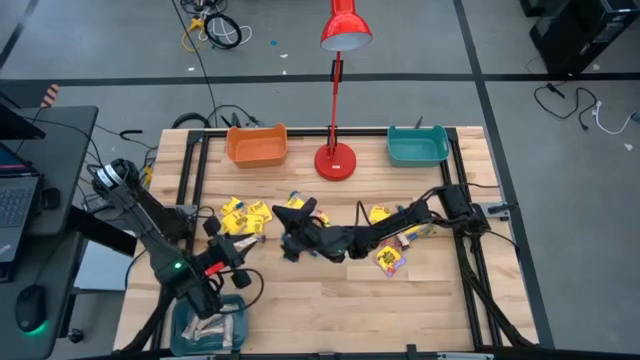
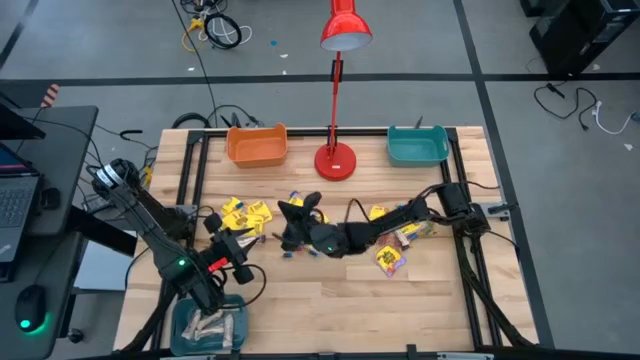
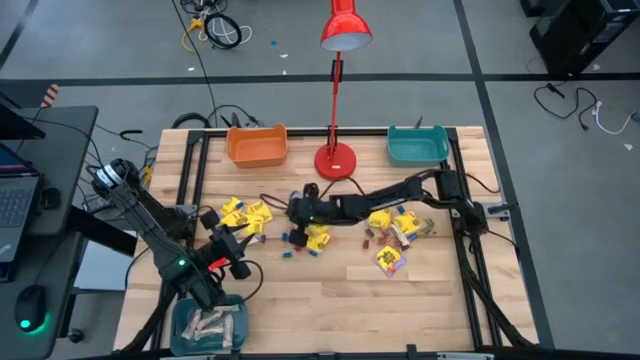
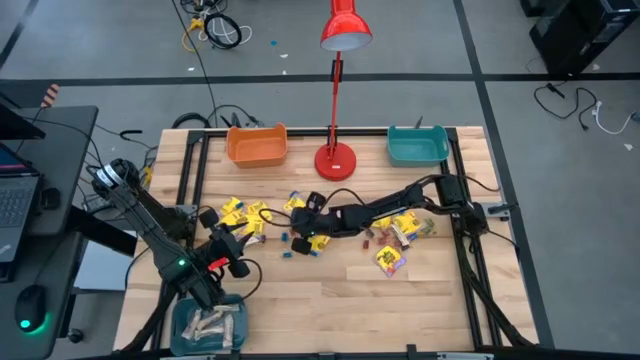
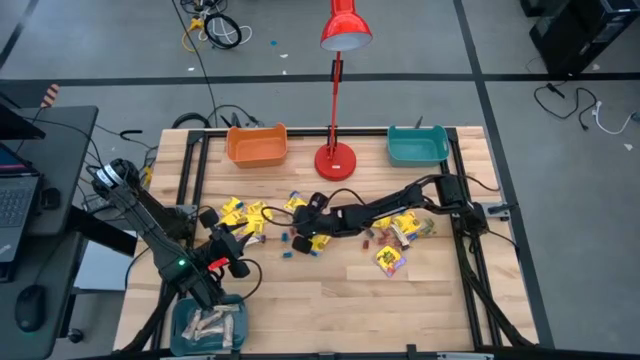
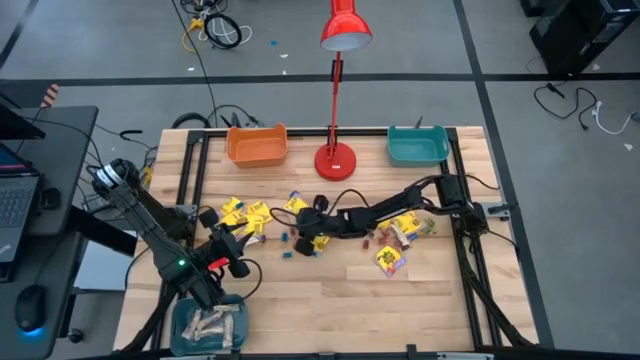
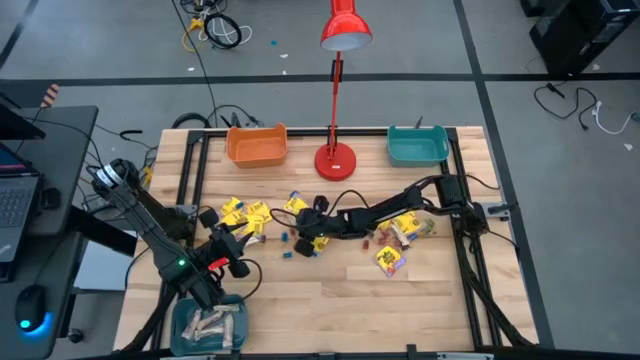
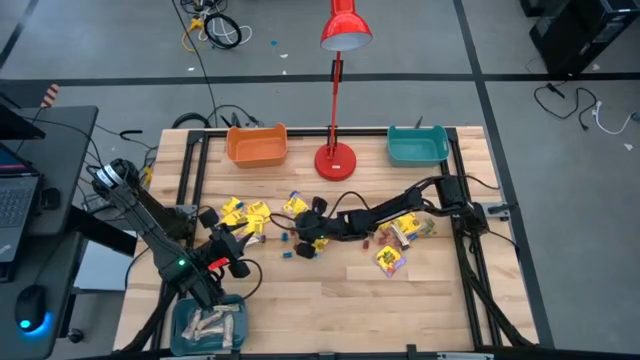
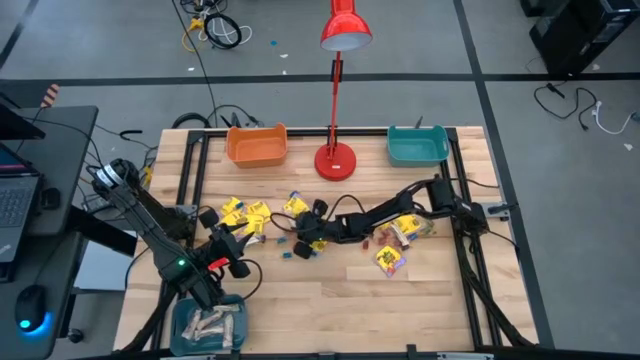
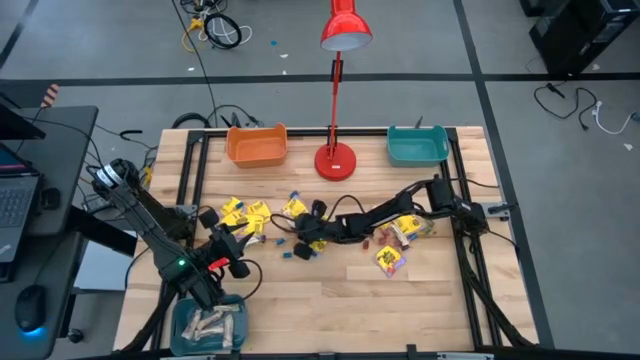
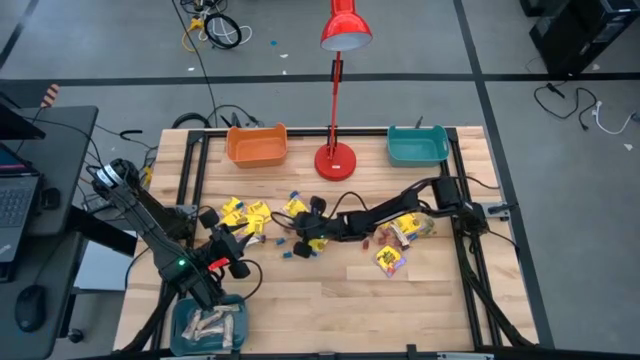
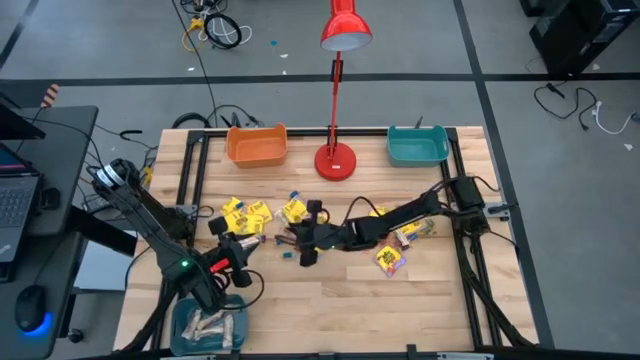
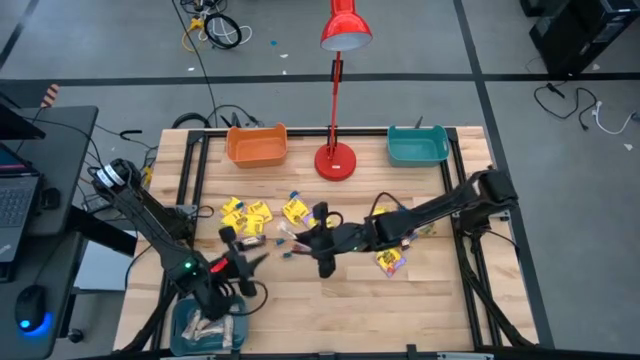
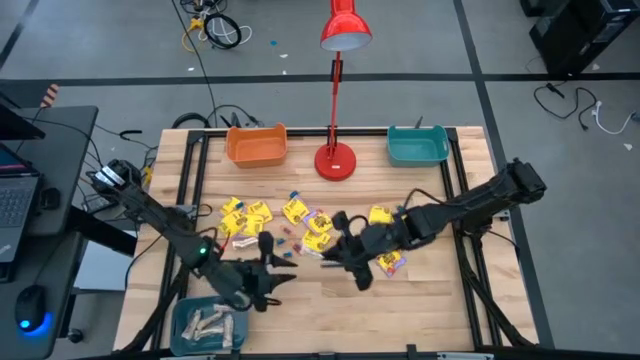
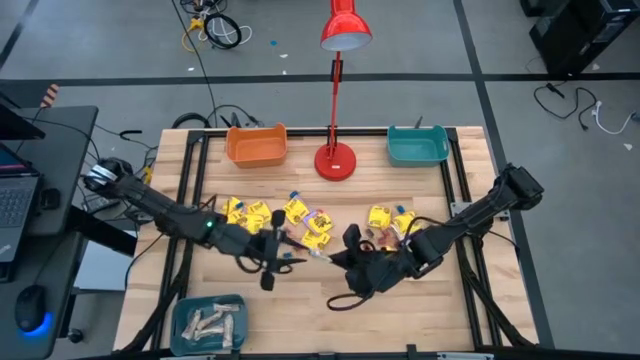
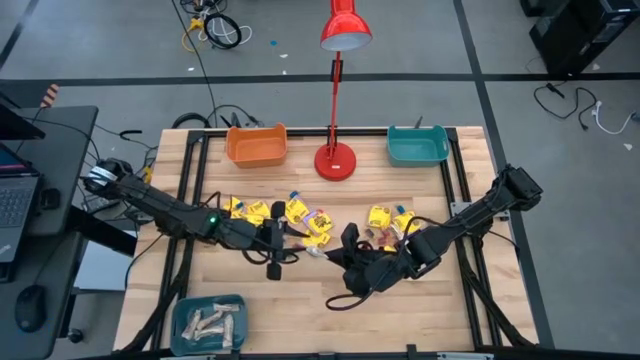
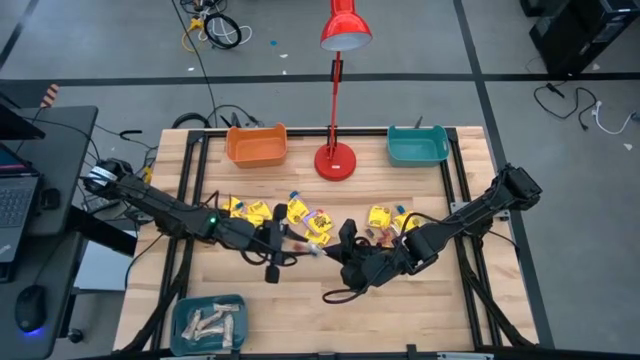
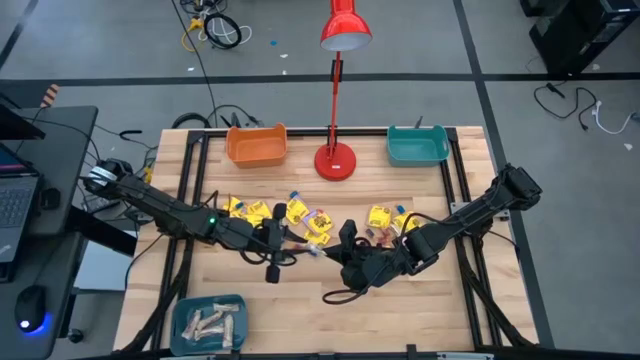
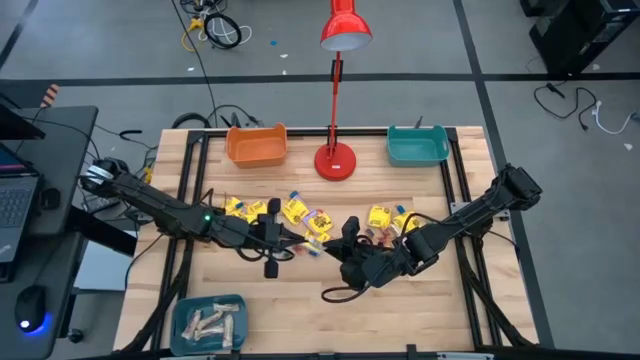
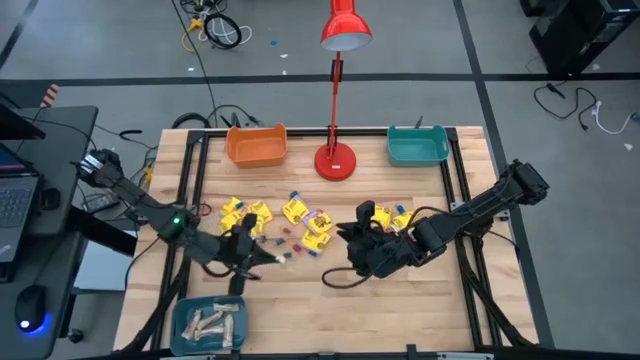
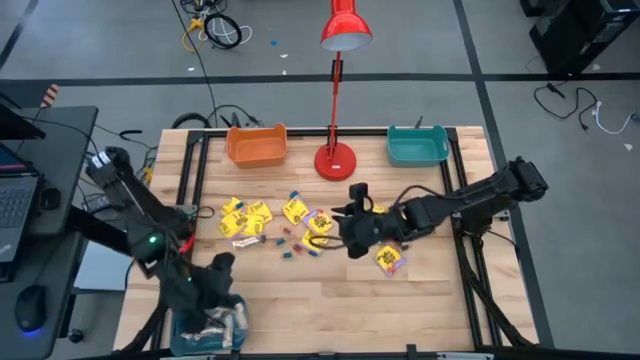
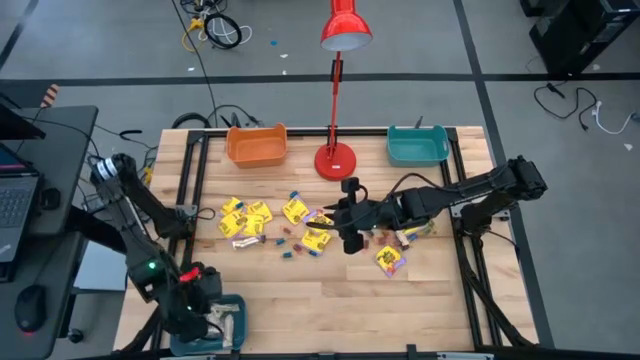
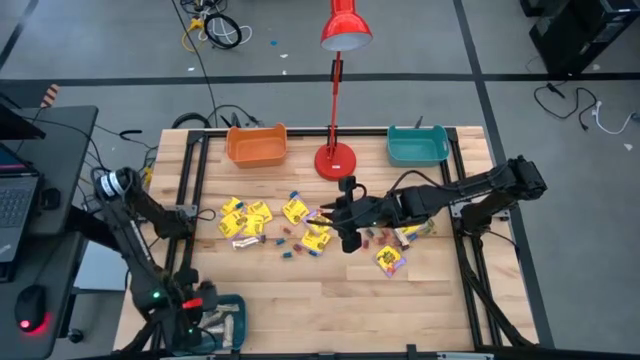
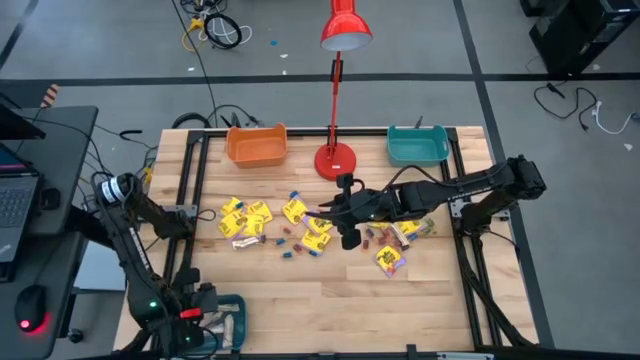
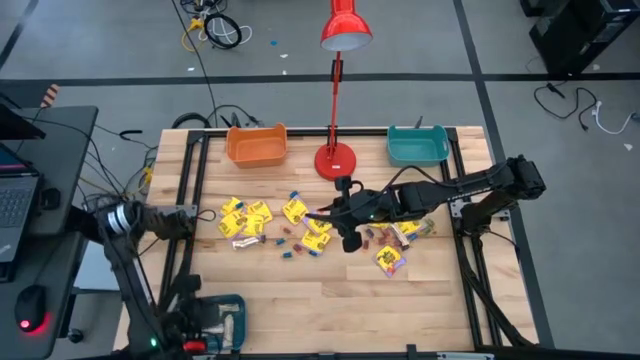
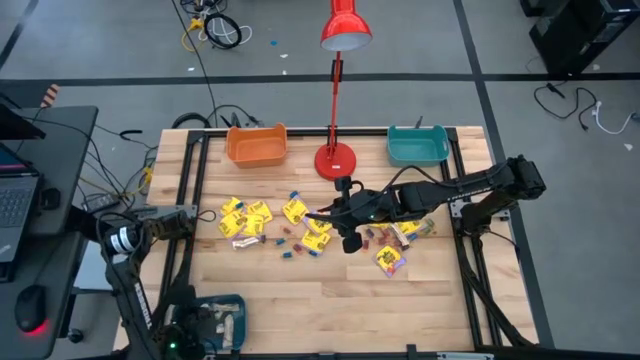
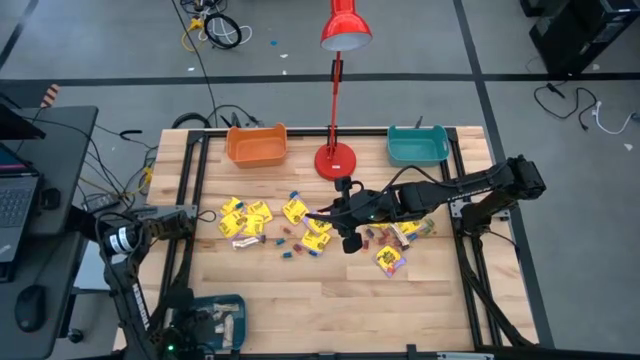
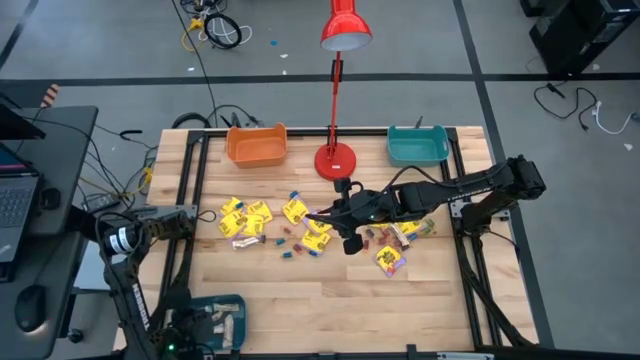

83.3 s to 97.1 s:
Task: Sort candy
Put the white candy into the blue bin

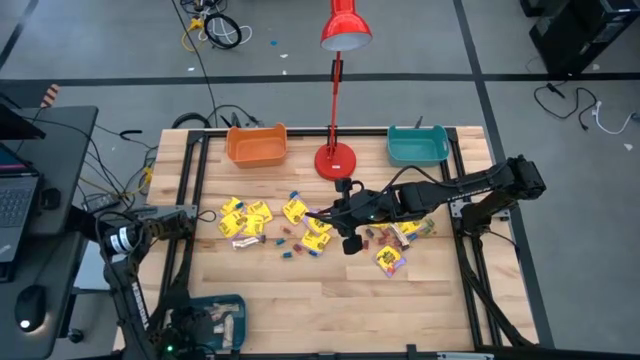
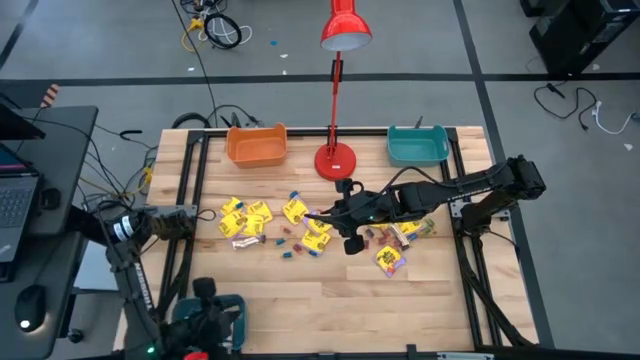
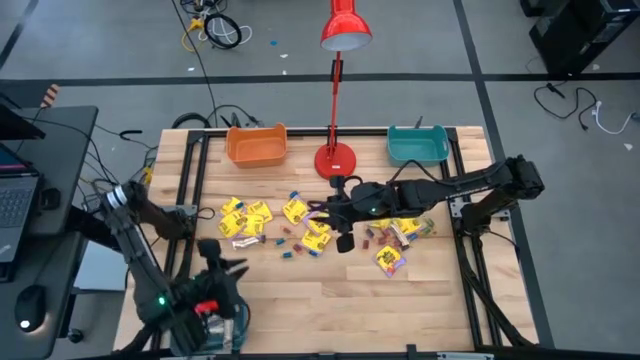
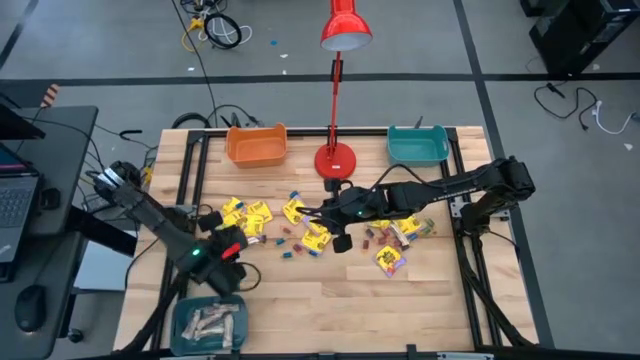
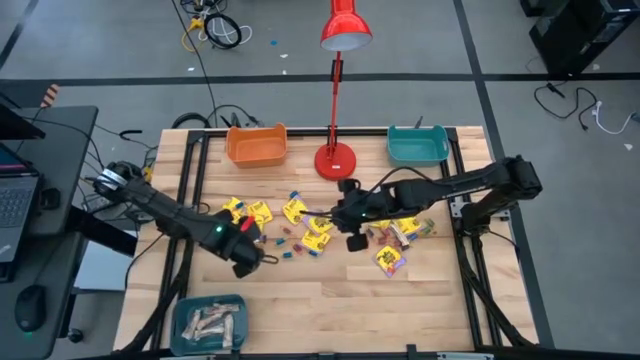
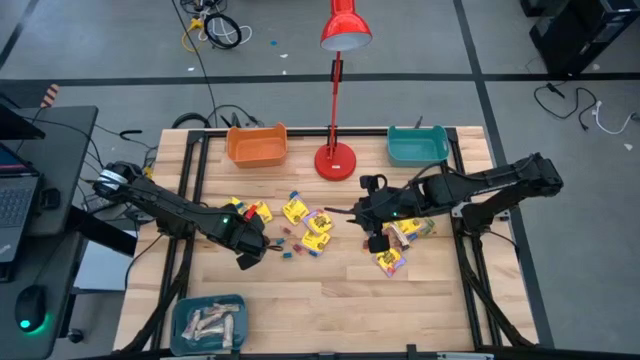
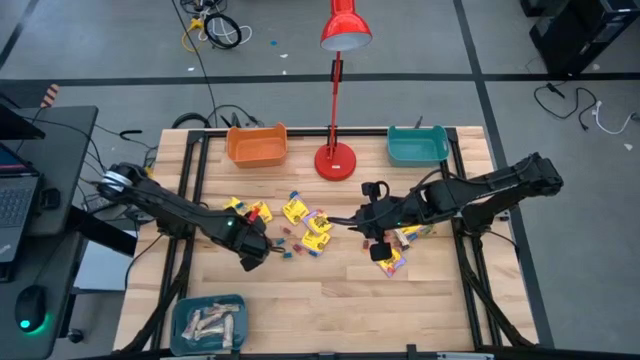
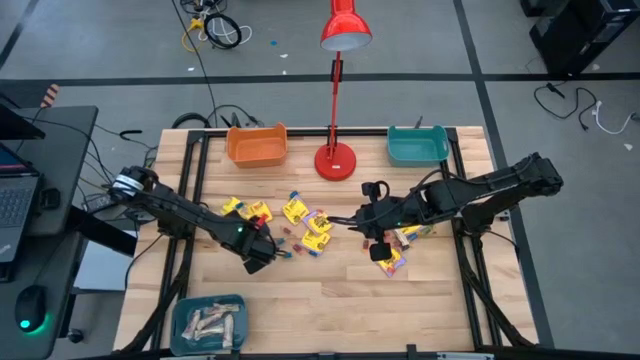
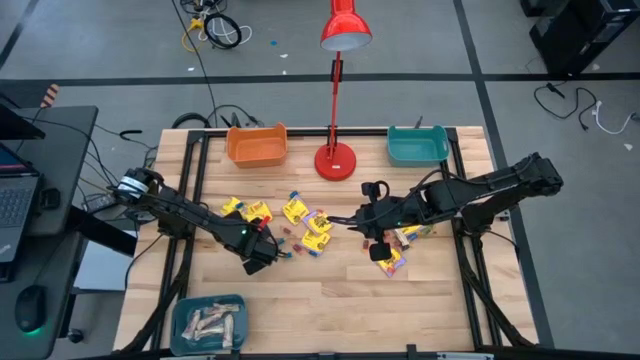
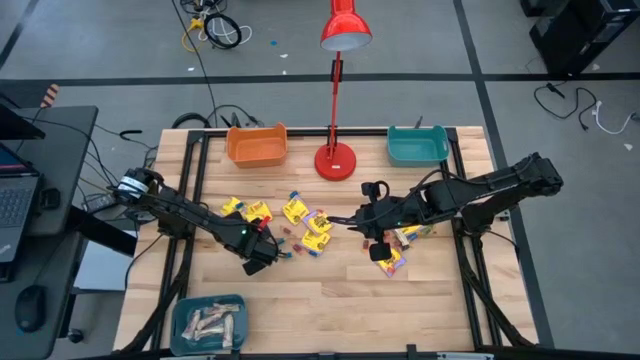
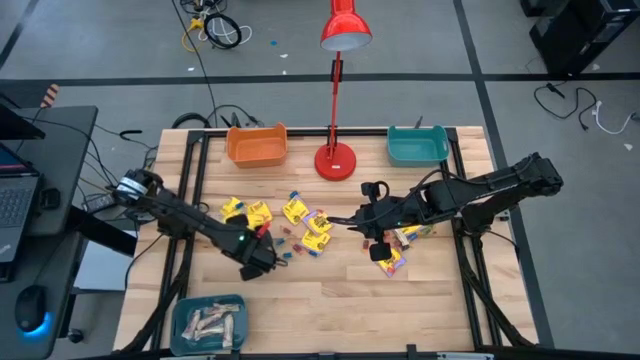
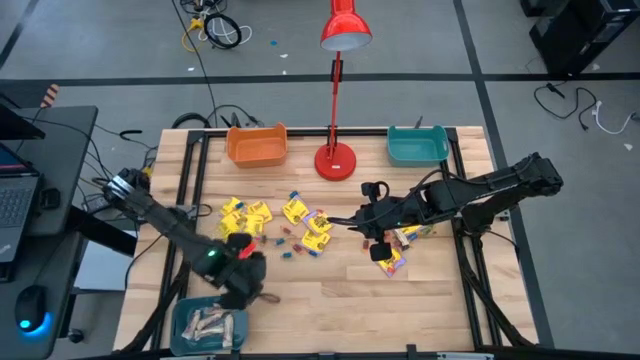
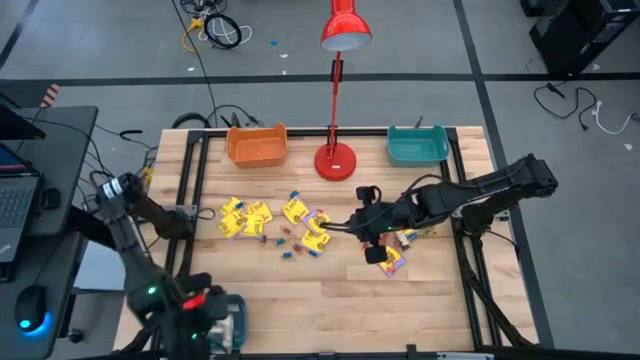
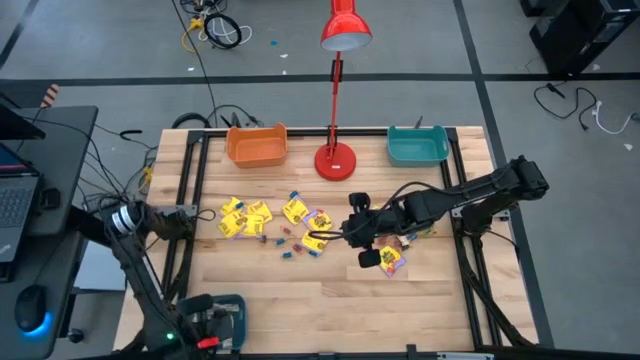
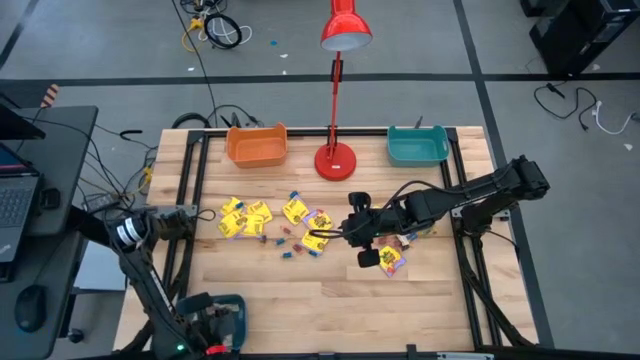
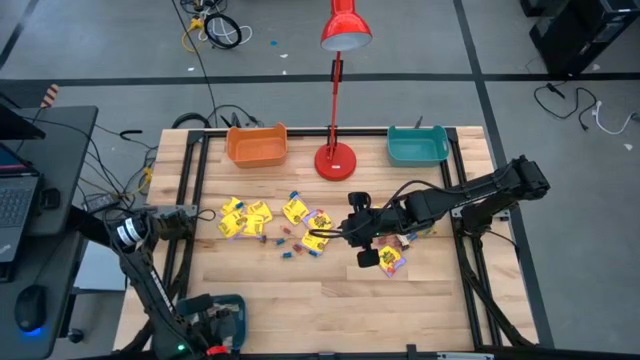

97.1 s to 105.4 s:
Put the white candy into the blue bin
